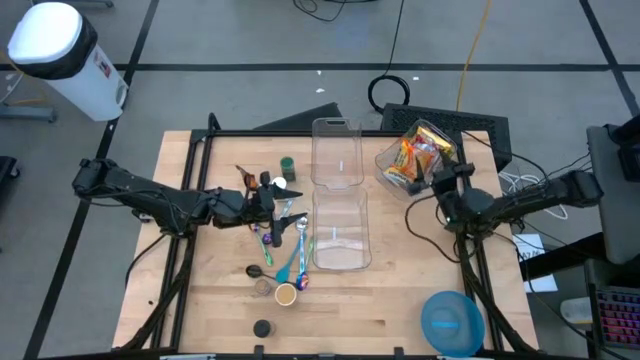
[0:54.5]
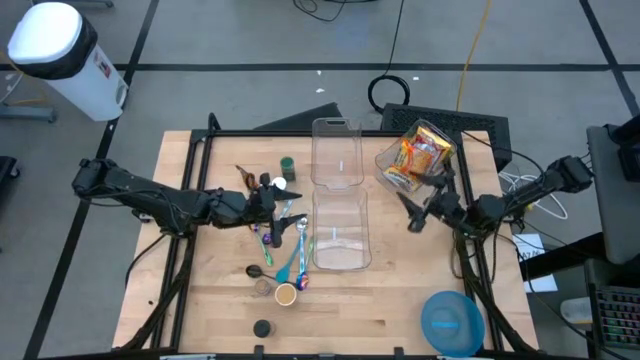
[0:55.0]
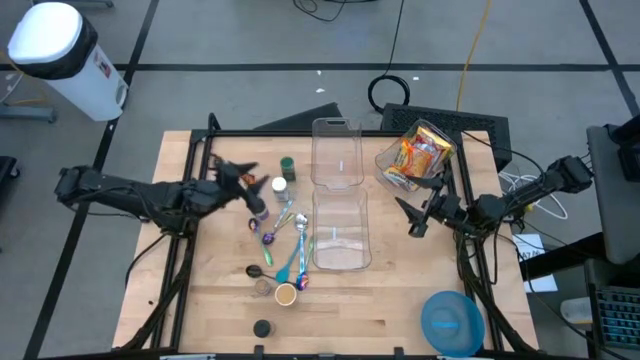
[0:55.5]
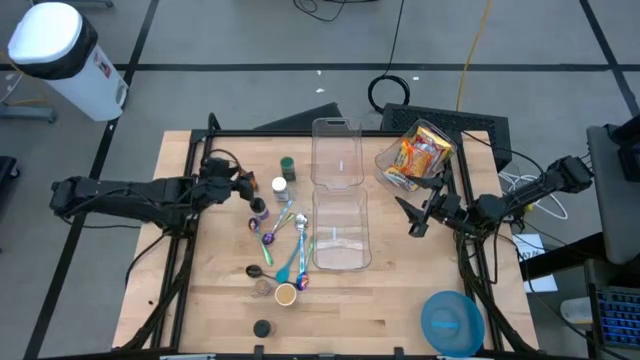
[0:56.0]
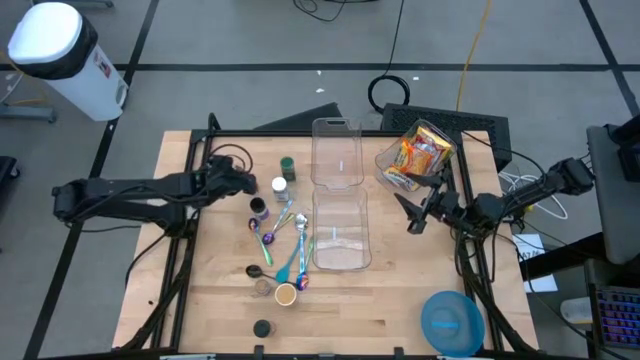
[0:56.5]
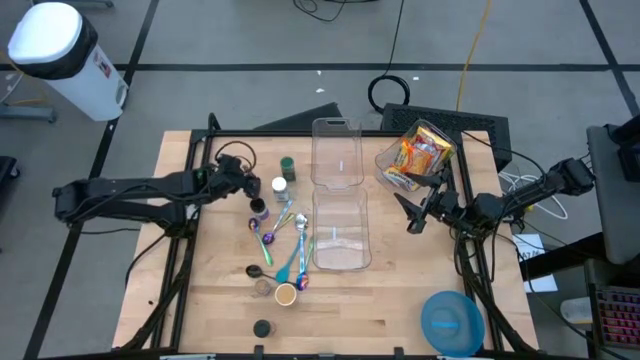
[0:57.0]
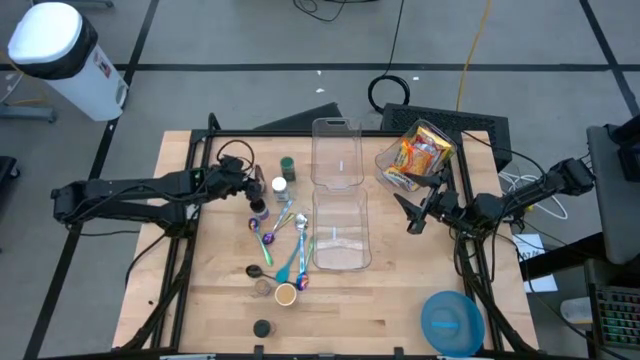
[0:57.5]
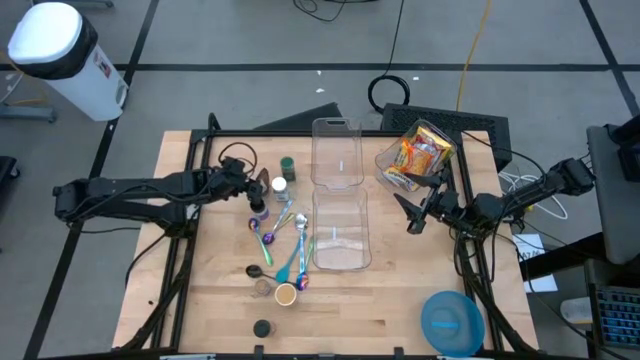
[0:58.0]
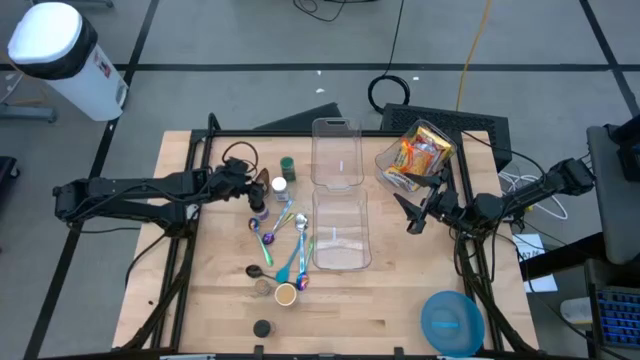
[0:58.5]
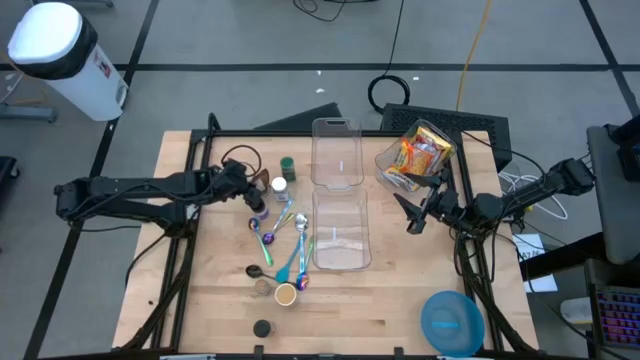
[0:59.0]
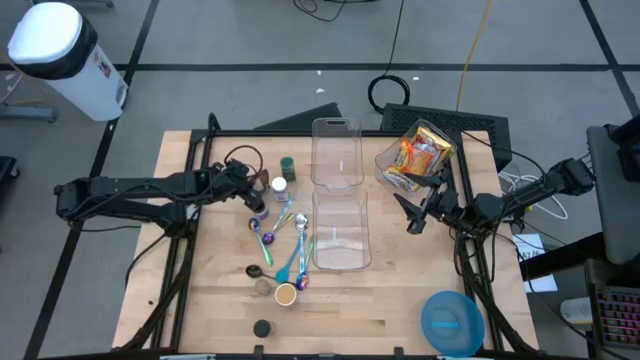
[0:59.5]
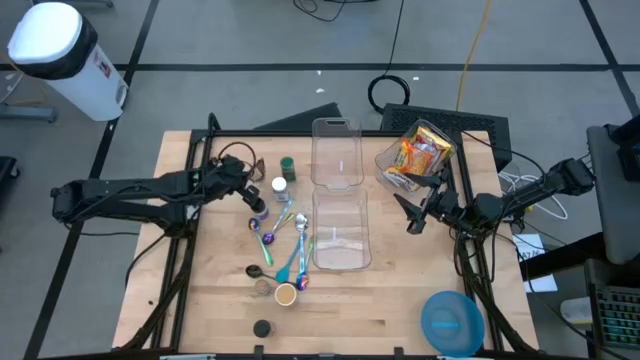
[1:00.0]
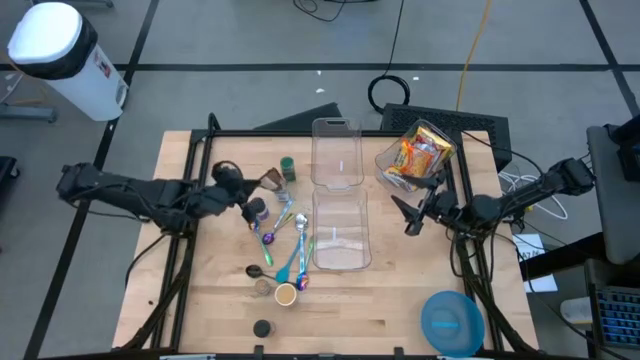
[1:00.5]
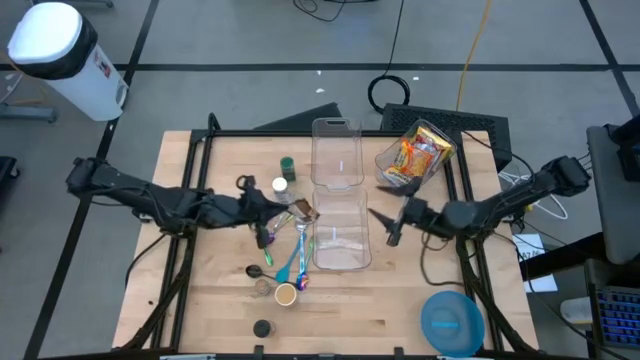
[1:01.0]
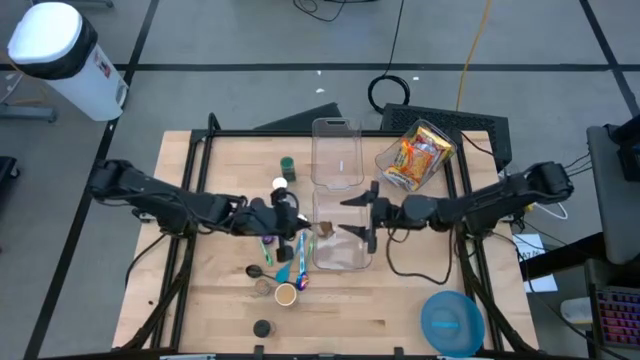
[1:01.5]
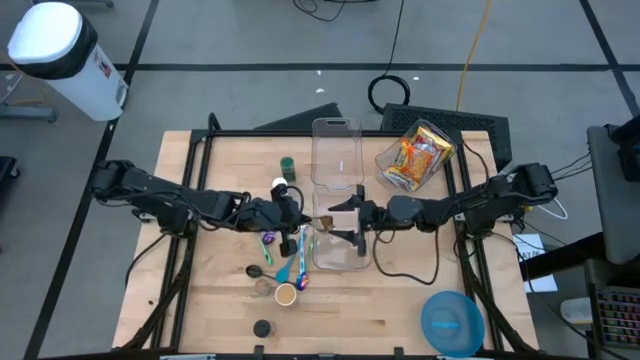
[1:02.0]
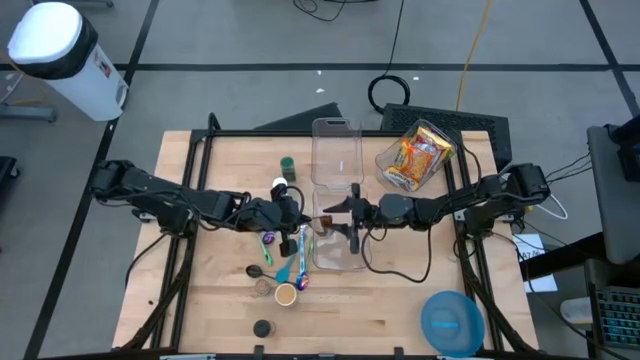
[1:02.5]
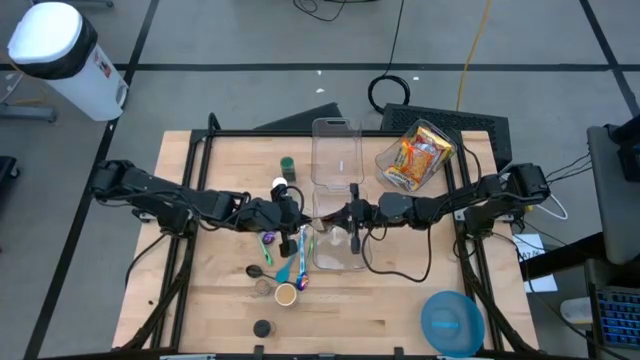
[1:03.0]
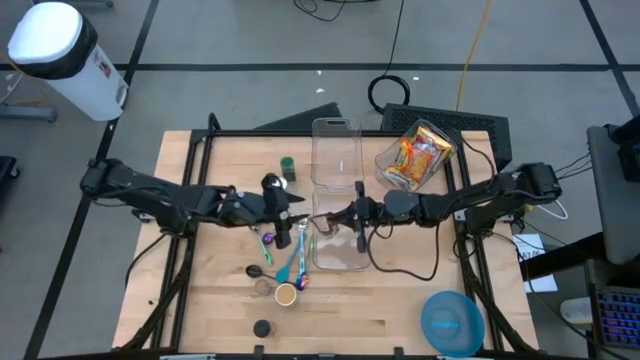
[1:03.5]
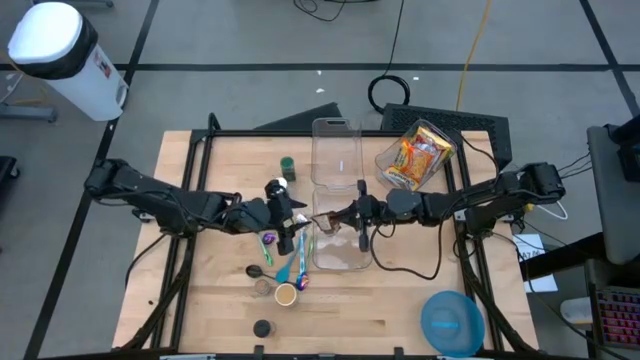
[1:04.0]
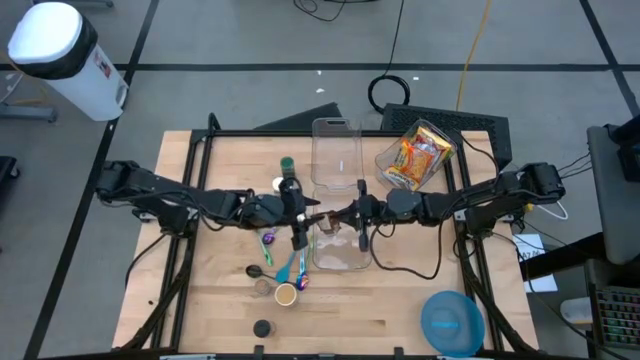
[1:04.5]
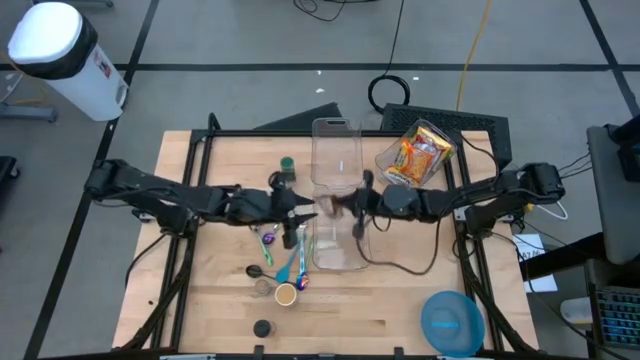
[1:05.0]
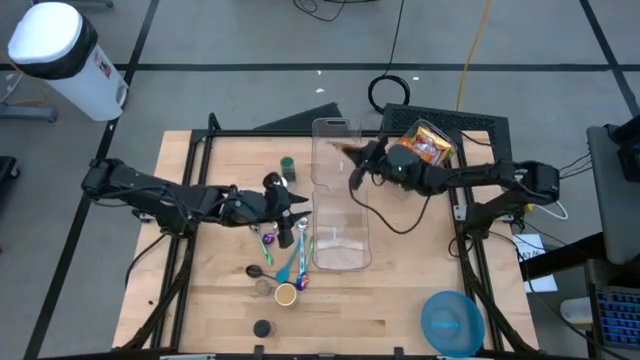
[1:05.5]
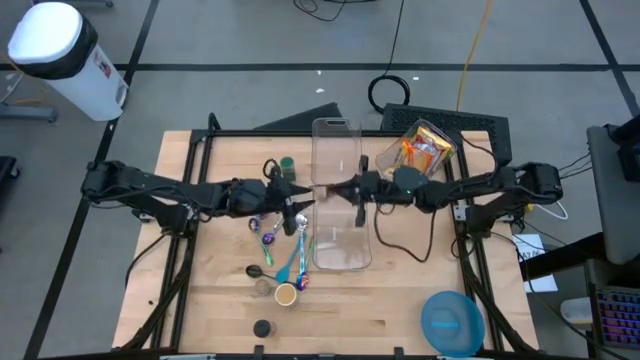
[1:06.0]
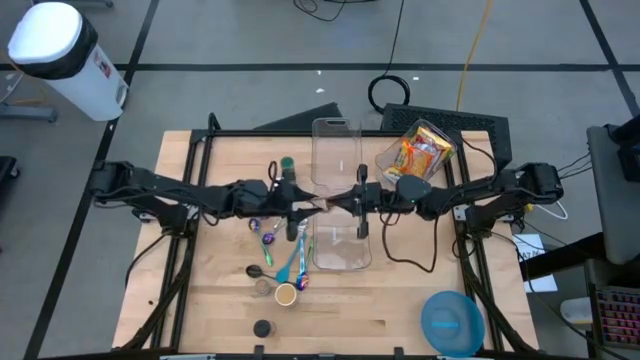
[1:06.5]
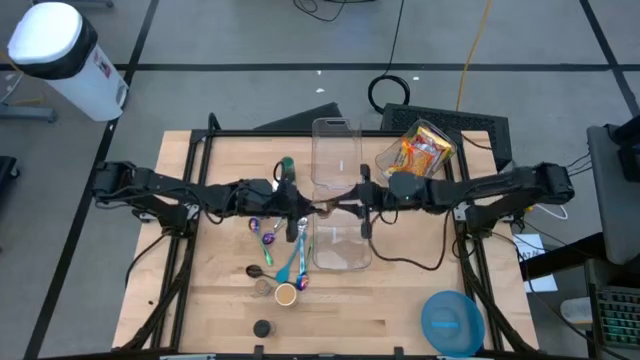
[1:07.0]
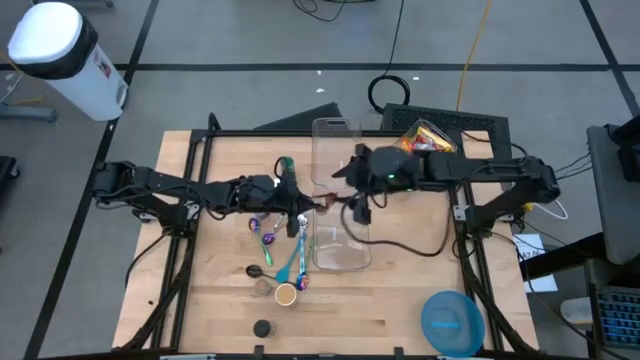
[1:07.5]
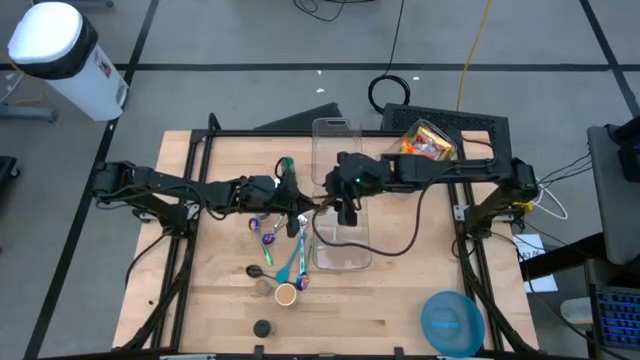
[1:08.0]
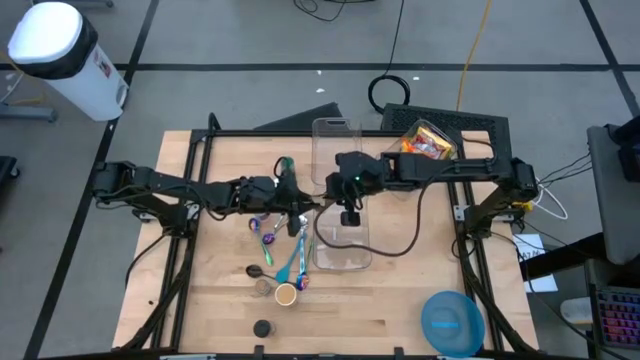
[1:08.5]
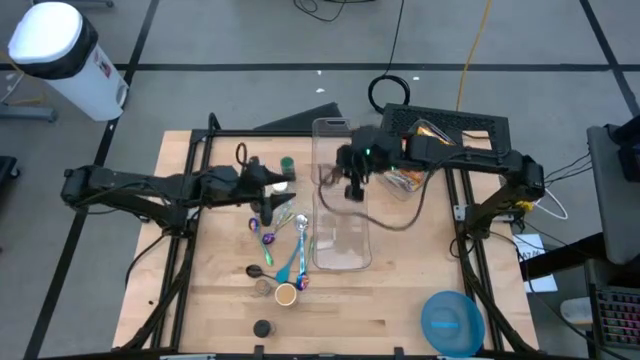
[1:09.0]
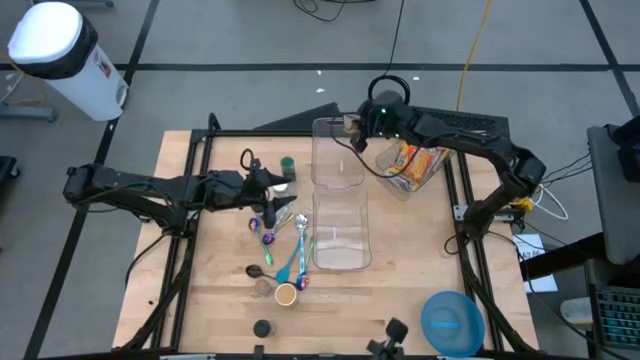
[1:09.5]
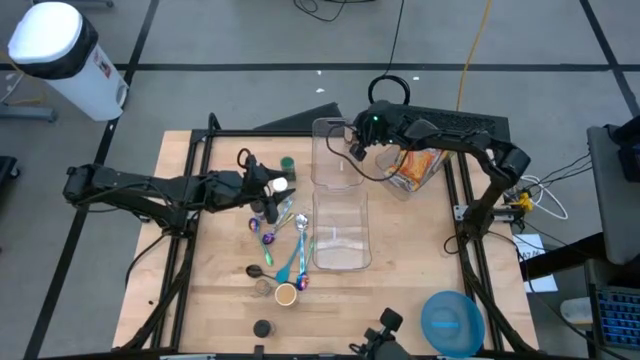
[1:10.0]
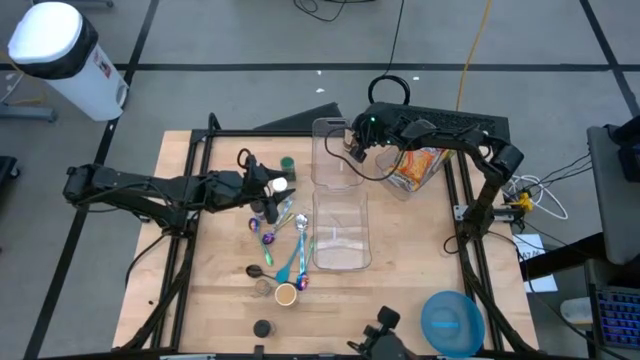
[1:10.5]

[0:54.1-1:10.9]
Task: Pick & Place Food Item
Put the orange spice pack into the top left transparent bin

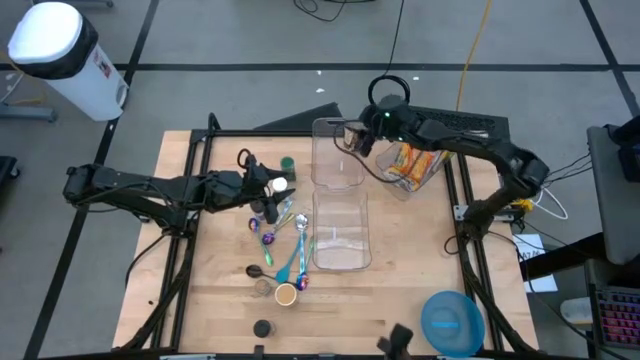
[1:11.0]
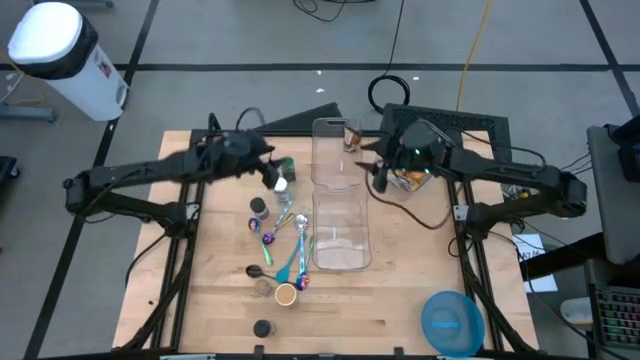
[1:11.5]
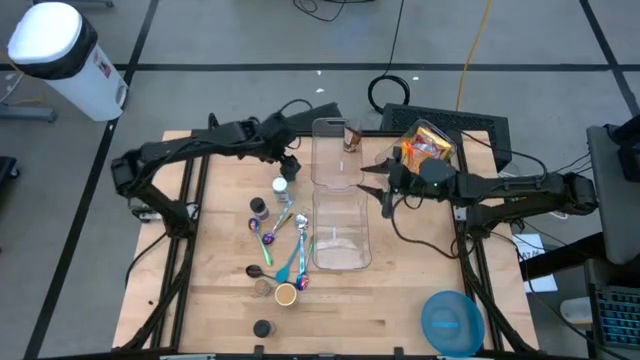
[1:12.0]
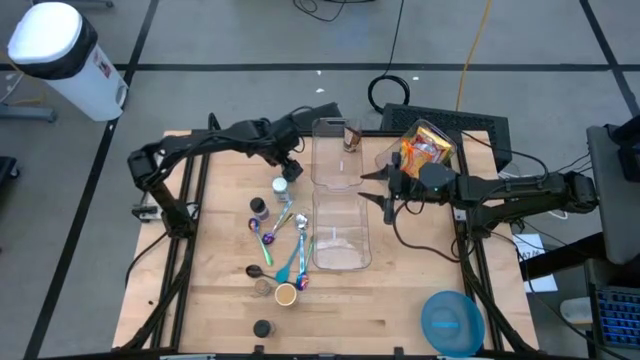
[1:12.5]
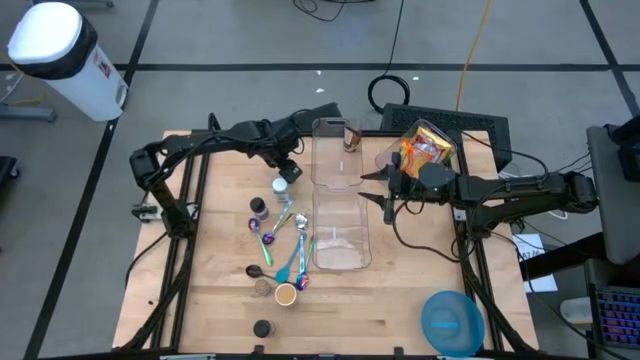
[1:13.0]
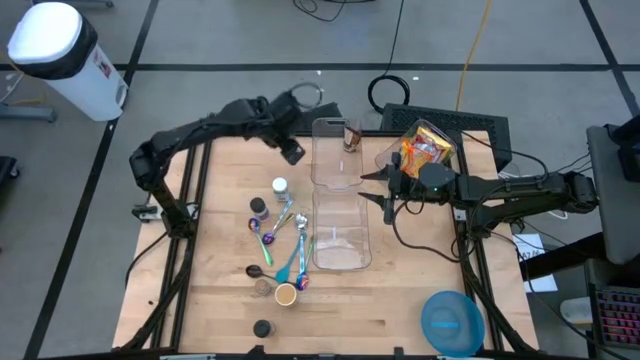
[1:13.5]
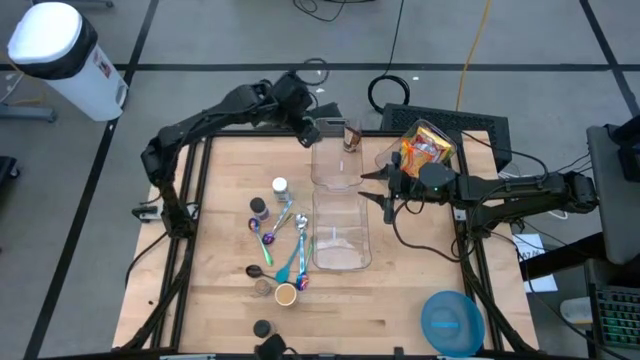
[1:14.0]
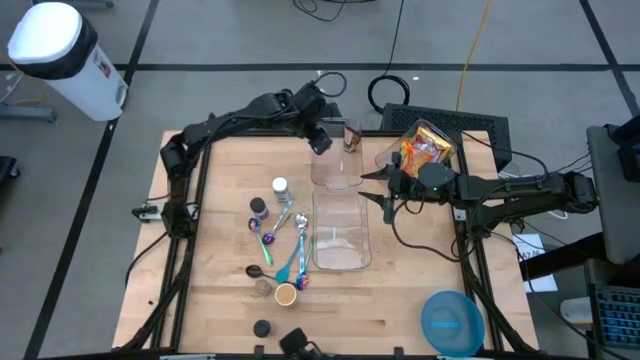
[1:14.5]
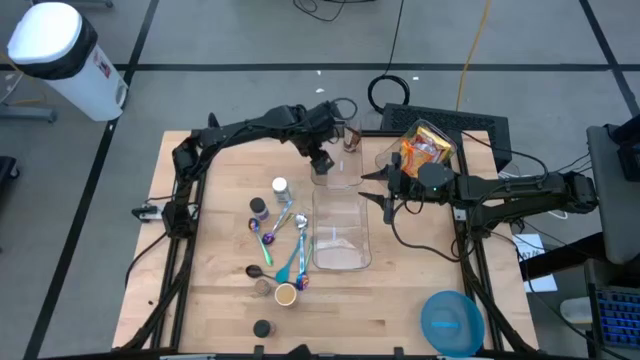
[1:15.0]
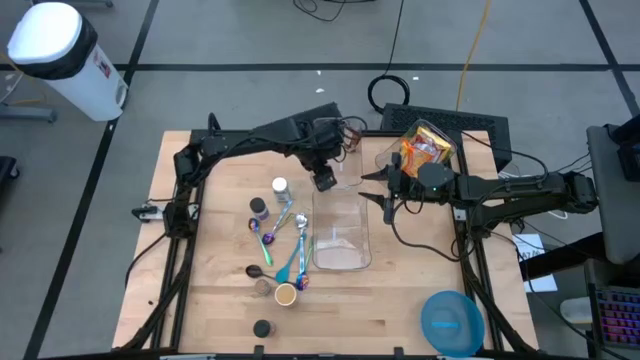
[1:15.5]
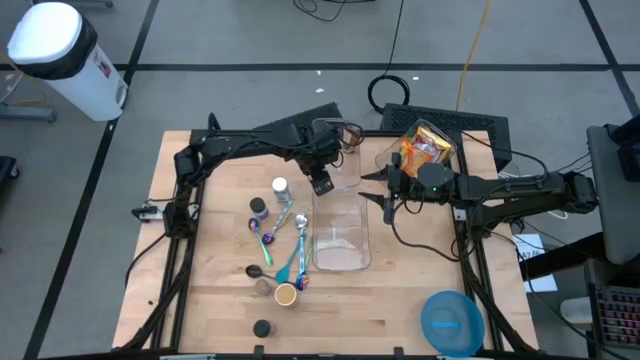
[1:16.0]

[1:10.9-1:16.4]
Put the green spice bottle into the top left transparent bin
